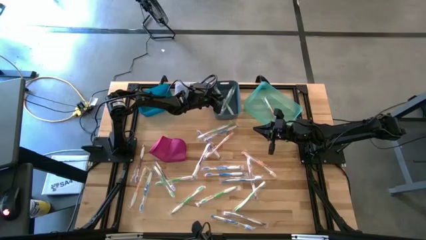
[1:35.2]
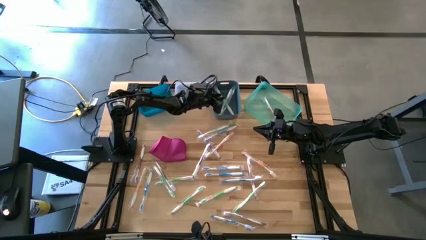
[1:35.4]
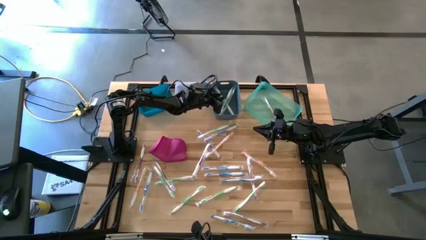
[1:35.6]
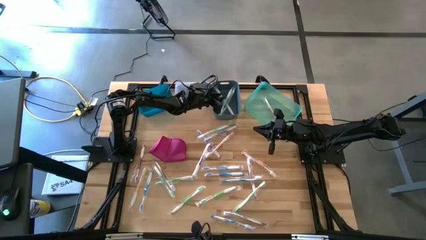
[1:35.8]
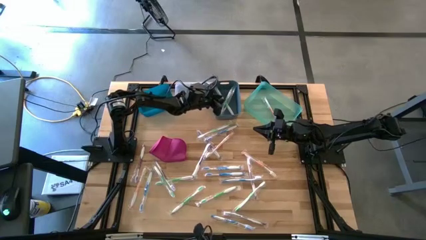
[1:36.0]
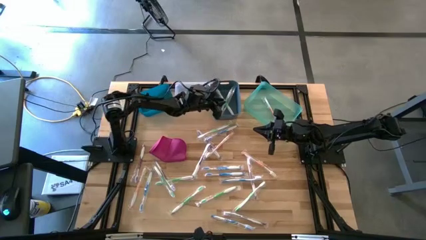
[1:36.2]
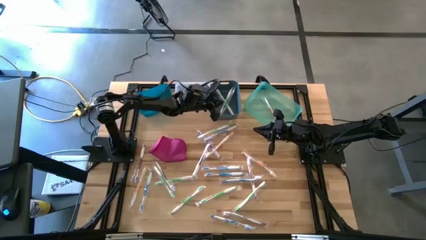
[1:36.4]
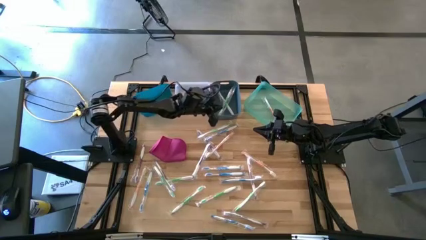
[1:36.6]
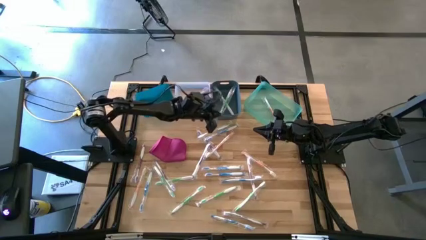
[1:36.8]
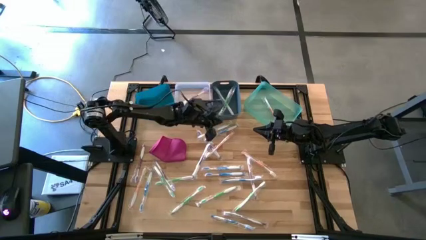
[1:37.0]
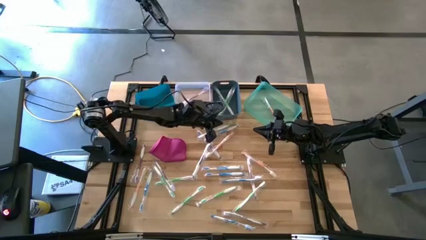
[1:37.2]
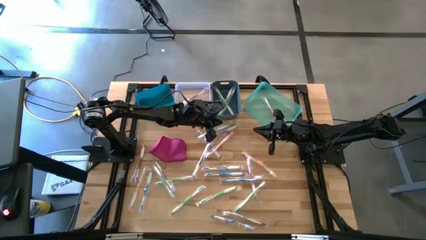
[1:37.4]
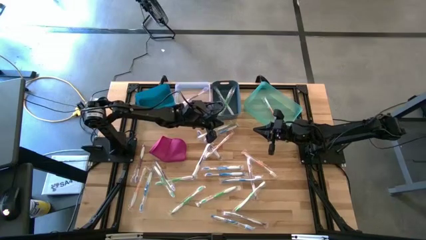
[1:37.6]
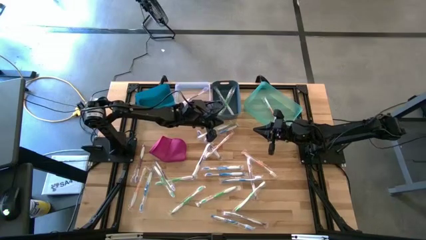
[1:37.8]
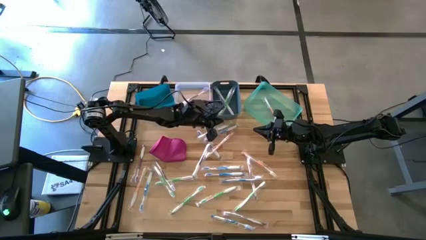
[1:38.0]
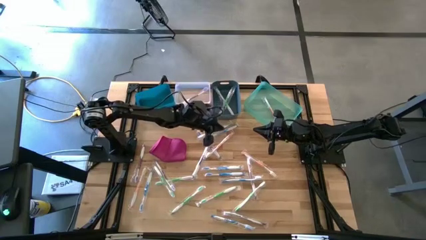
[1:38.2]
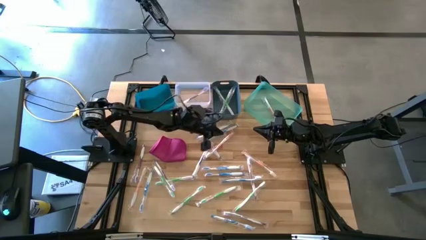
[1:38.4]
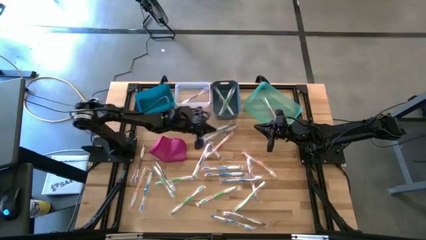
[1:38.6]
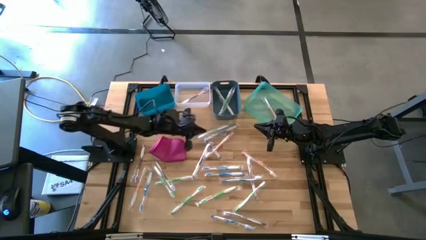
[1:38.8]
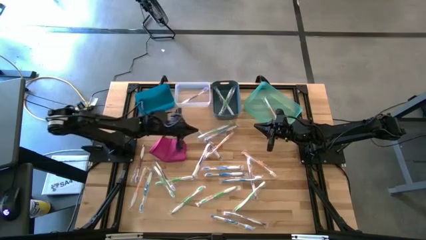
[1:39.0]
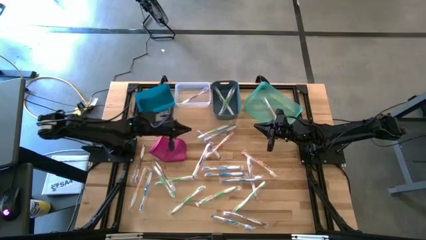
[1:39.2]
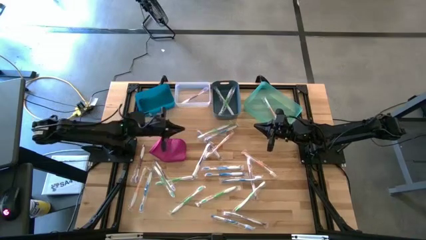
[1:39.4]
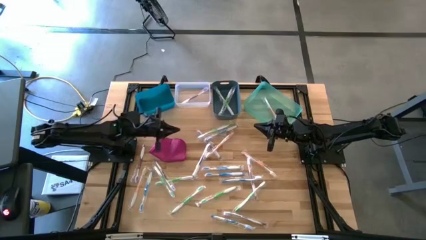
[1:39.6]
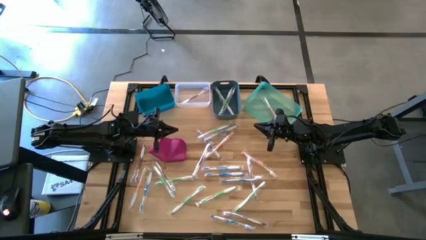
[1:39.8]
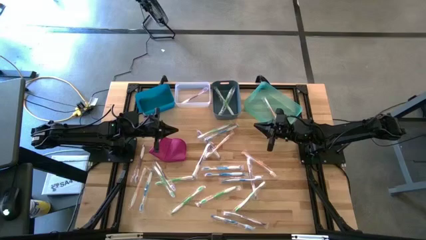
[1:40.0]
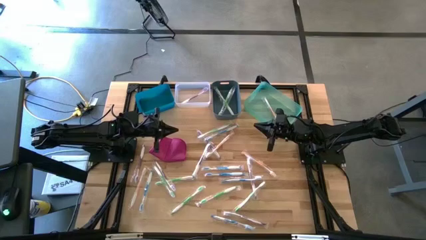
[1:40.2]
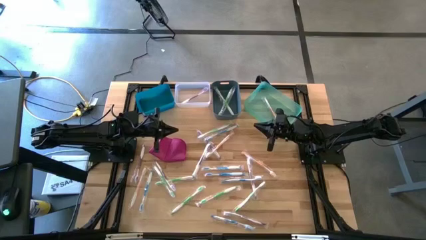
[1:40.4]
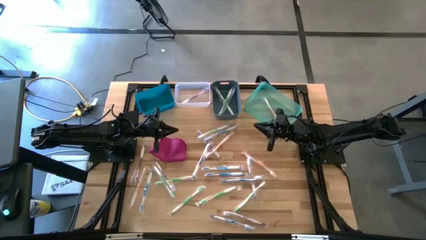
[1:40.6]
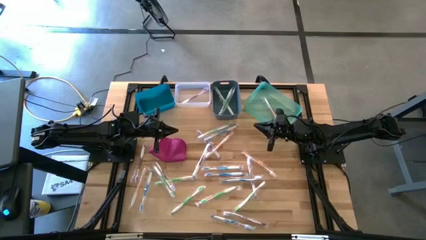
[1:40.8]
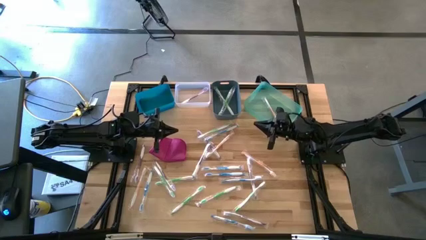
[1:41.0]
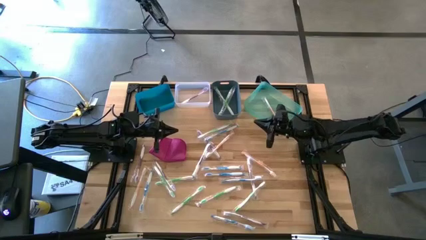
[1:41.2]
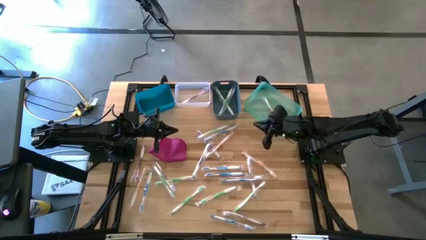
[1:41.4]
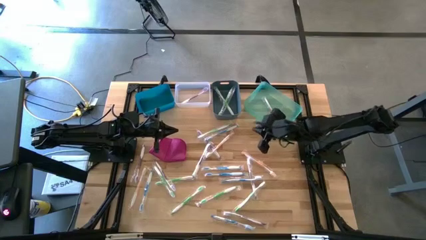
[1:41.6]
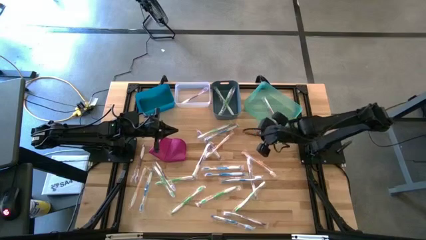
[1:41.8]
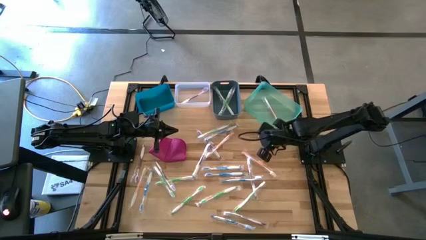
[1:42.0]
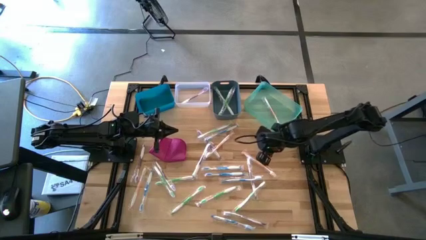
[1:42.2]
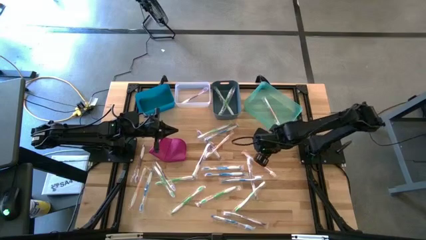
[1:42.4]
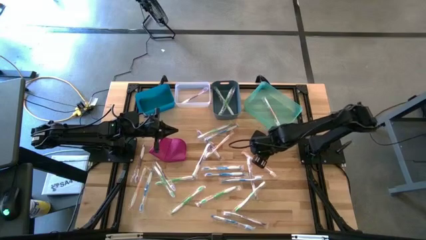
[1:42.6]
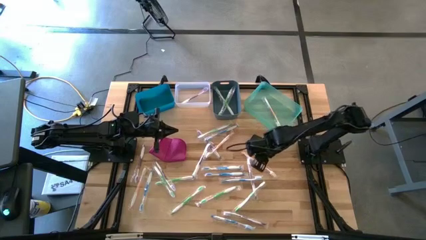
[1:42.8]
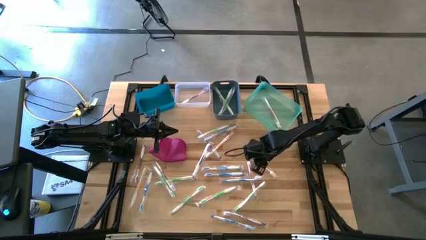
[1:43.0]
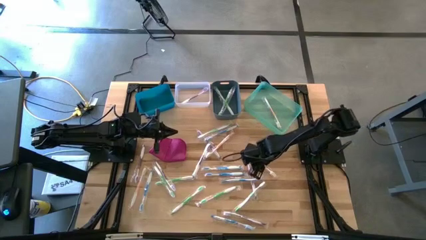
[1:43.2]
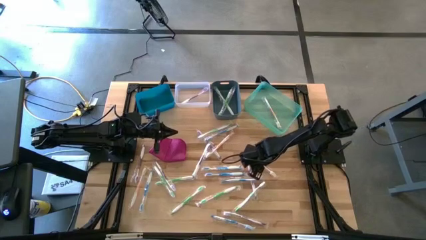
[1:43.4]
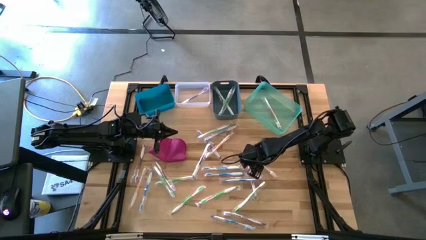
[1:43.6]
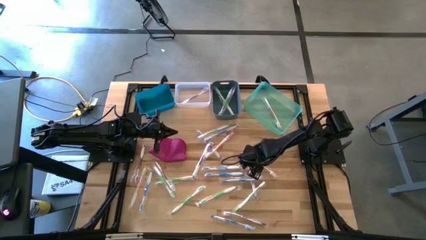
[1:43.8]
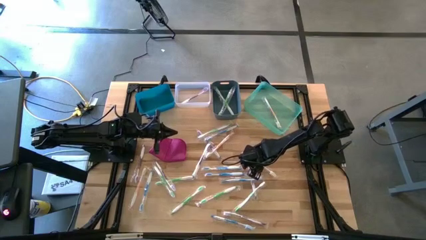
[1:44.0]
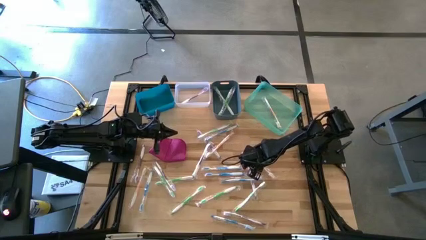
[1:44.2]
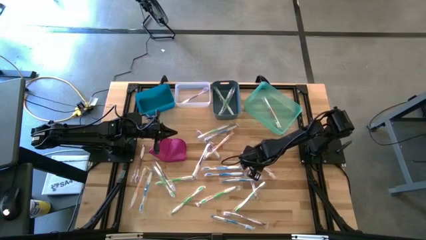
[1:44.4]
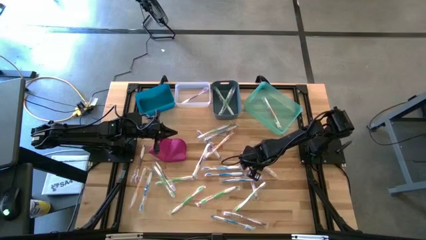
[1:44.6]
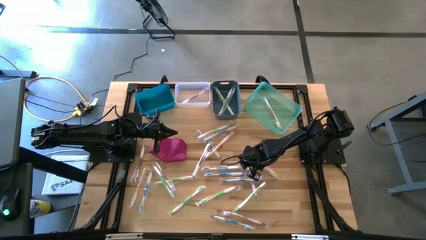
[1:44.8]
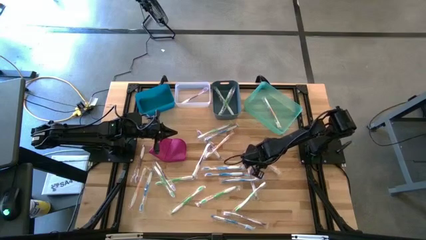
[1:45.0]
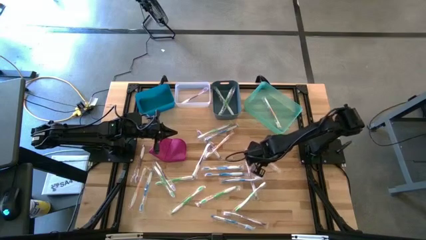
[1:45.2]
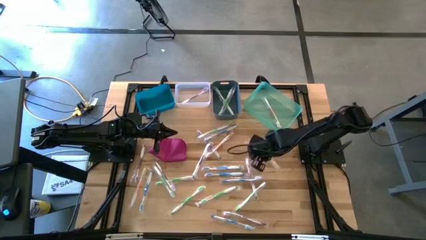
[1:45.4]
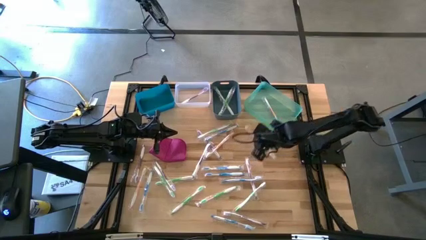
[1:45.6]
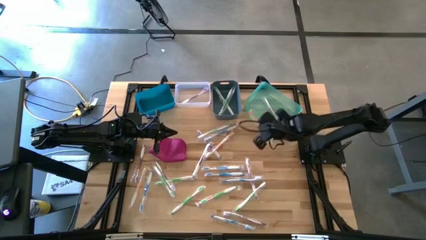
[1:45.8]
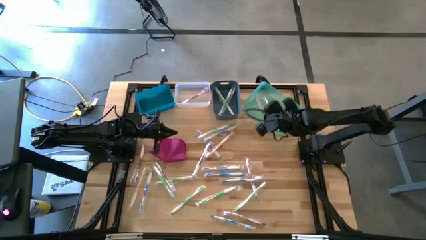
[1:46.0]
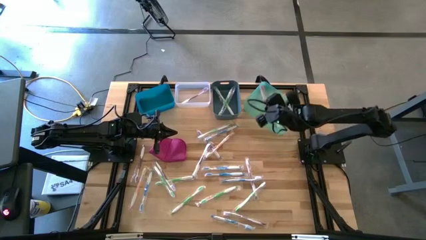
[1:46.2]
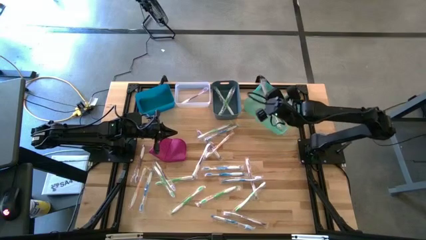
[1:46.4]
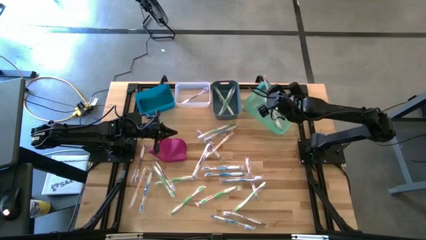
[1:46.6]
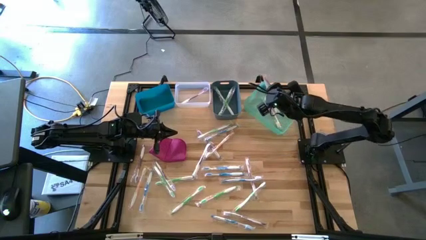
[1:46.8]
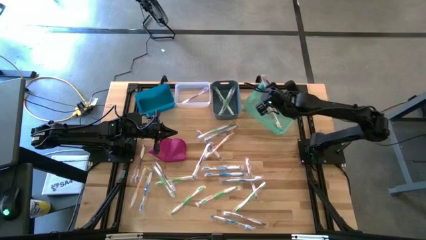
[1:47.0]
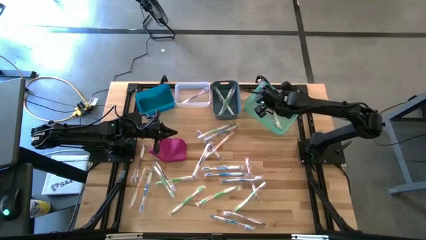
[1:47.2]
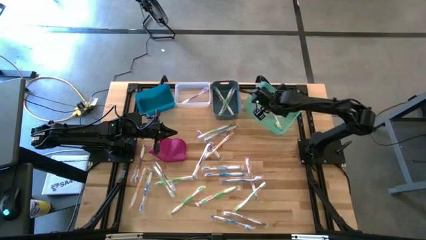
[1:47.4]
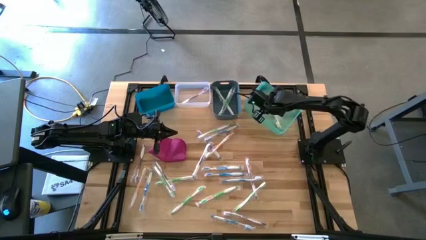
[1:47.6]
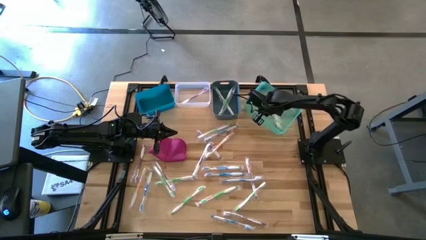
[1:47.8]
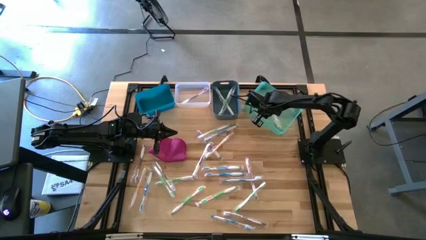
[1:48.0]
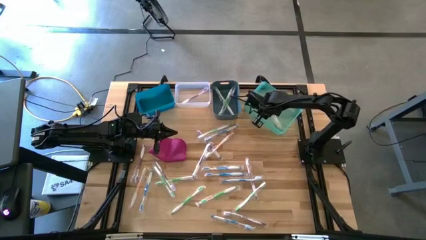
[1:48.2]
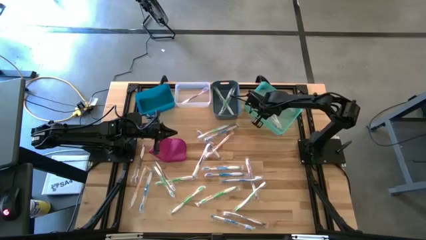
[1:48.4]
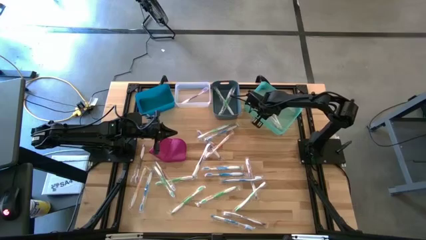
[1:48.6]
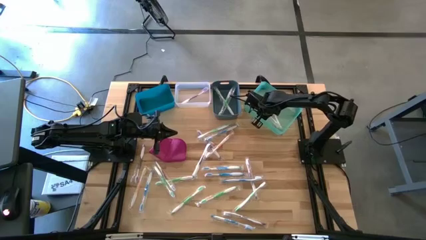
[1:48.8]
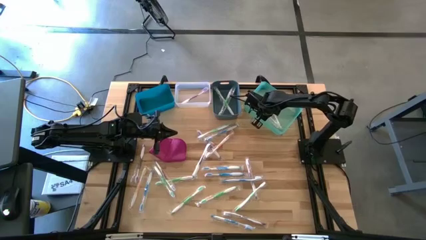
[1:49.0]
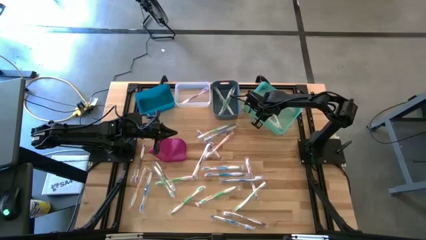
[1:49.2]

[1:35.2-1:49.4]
Task: Pick & Place Toothbrushes
Put the orange toothbrush into the light blue bin

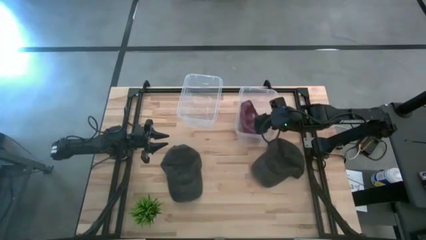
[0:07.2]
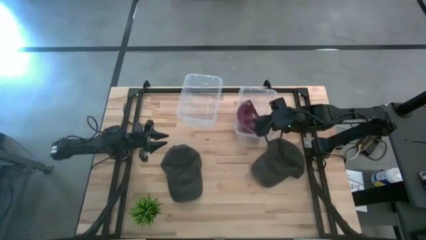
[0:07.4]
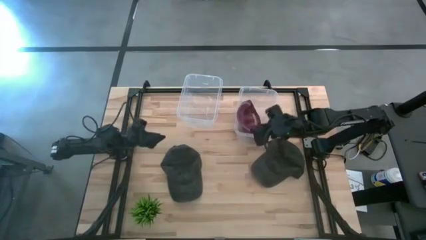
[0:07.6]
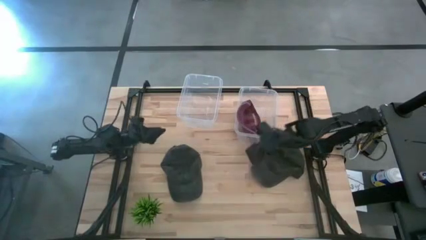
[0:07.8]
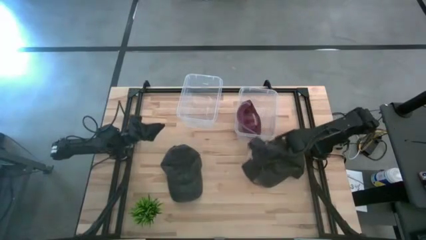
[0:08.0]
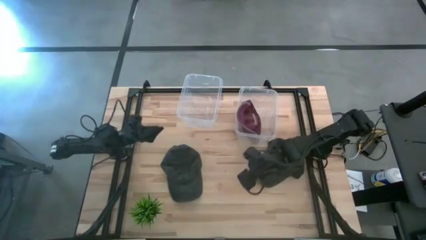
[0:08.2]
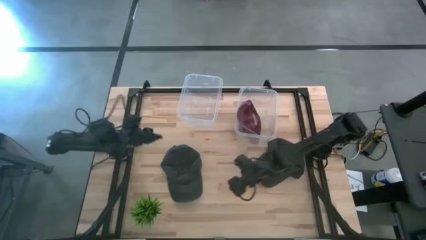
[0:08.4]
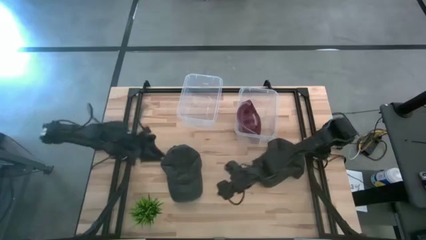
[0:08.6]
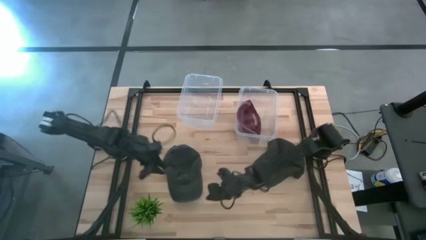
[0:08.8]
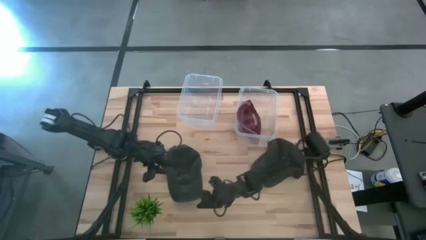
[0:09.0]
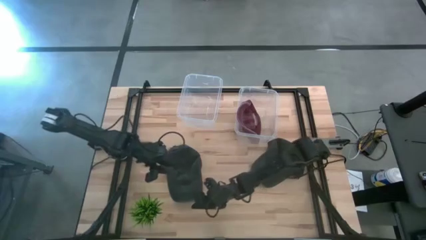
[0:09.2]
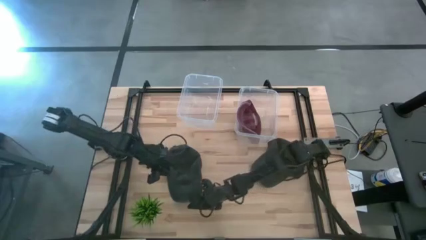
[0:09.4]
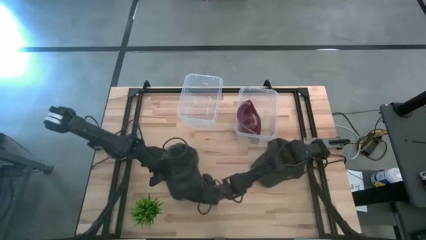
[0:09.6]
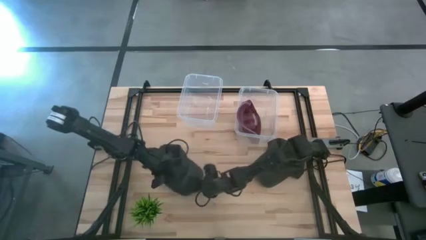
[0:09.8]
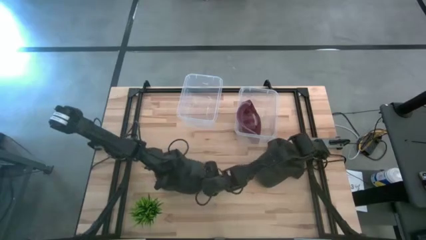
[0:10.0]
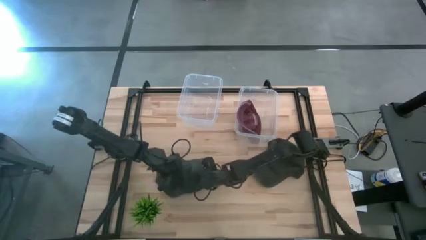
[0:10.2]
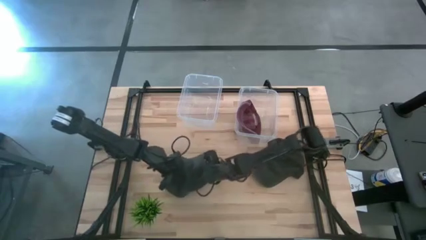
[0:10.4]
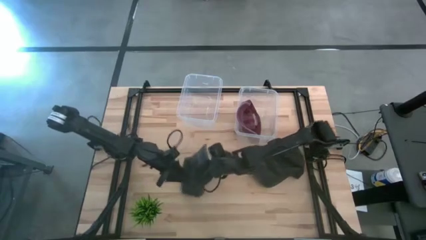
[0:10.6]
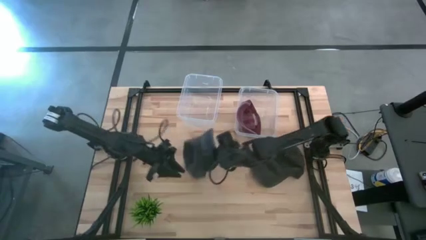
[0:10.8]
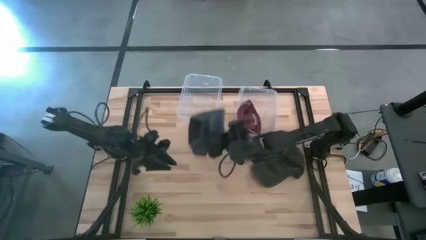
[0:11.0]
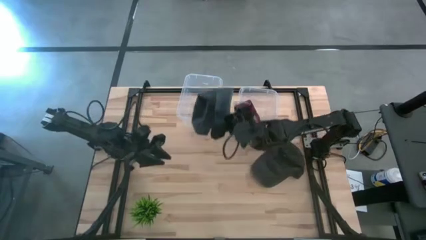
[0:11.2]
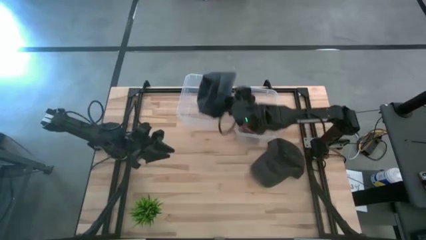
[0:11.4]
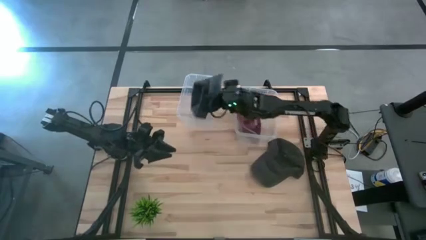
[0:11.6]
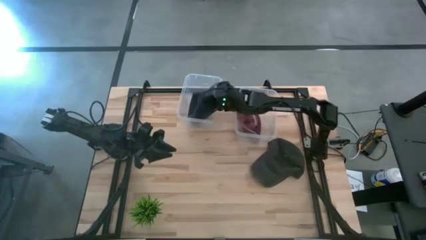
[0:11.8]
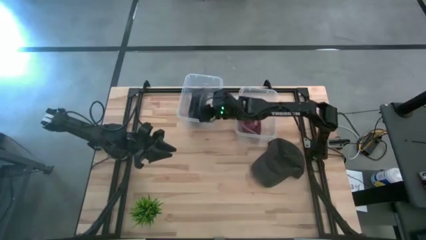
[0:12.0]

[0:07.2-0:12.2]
Task: Pick & Place hat
Put the black cap into the left transparent bin
